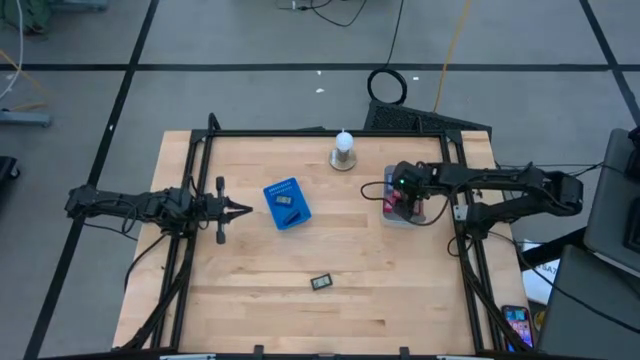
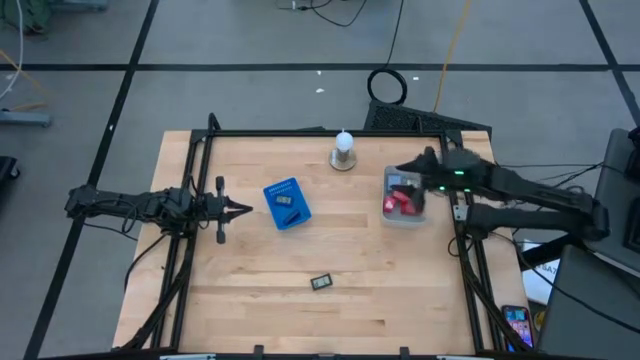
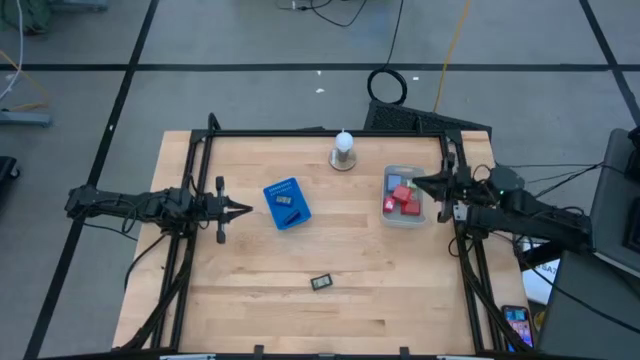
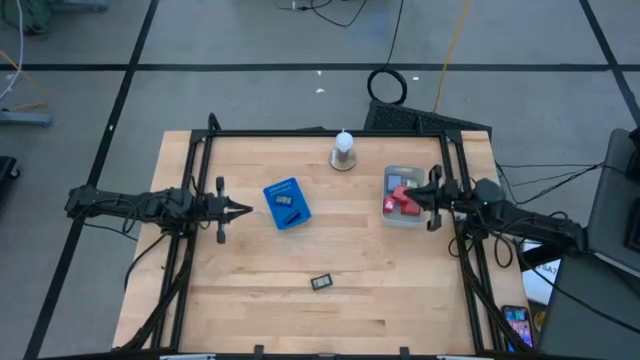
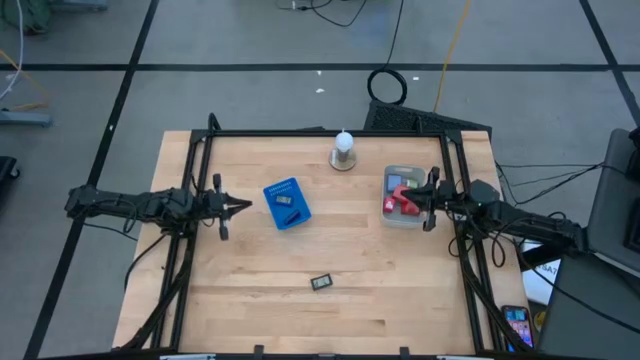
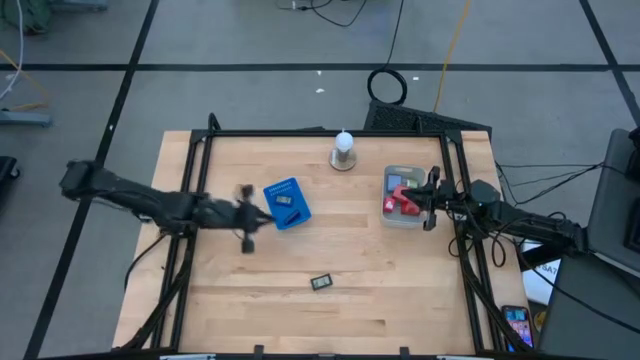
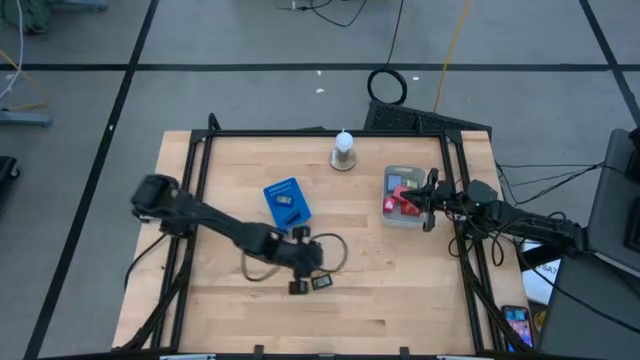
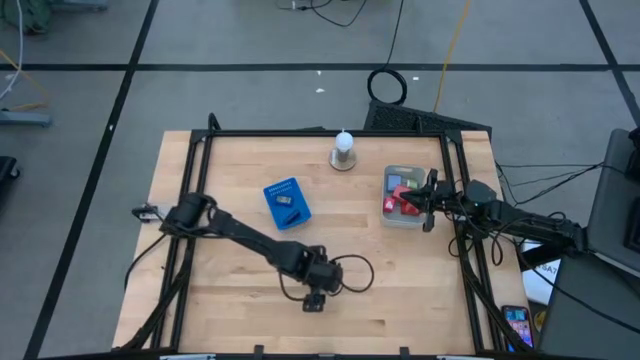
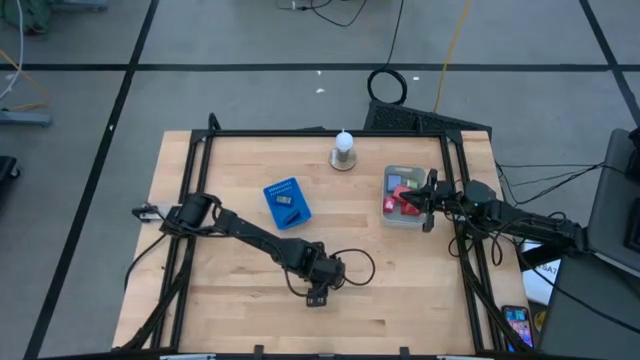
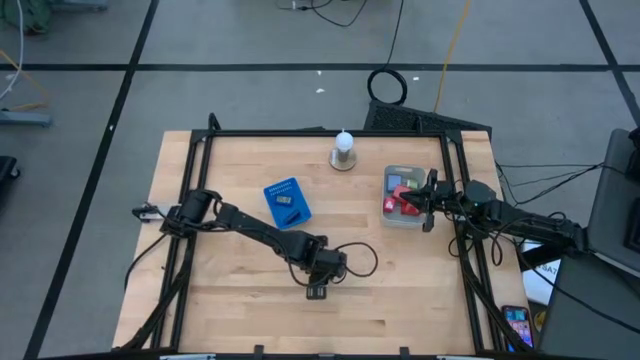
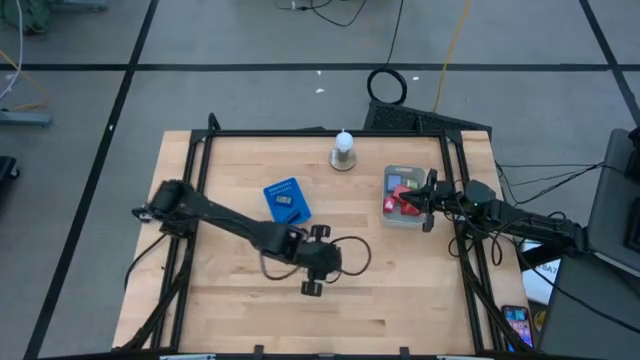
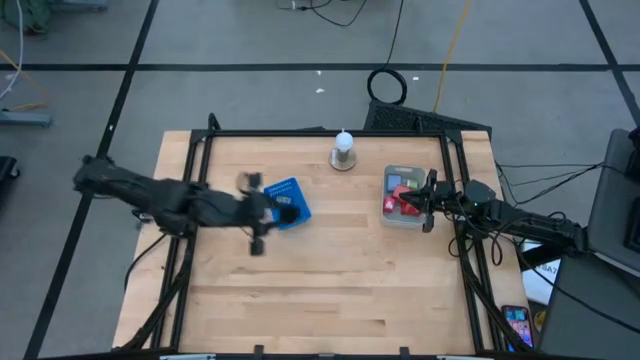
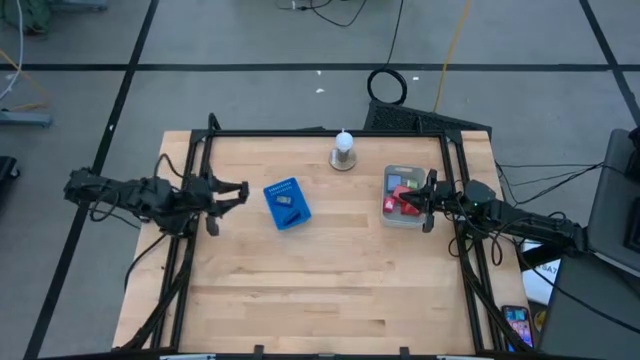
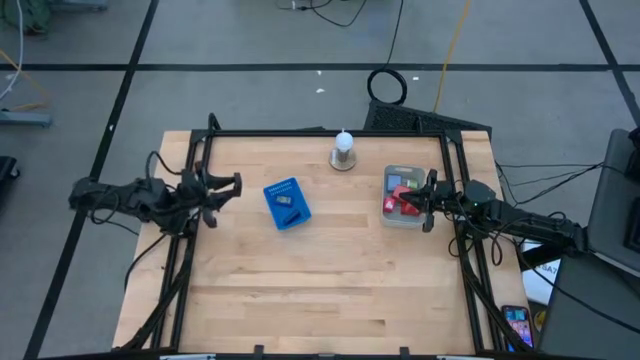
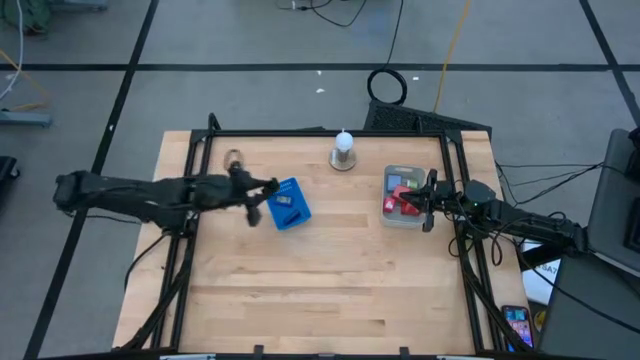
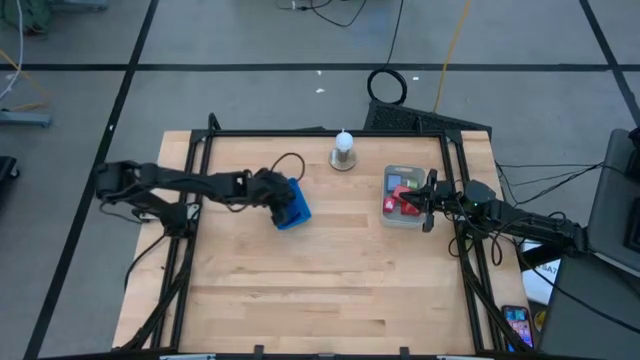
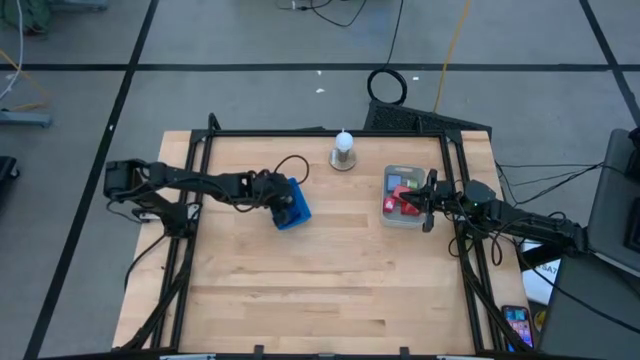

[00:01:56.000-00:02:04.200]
Task: Pick & Place Office items
Put the black digital clock into the blue bin

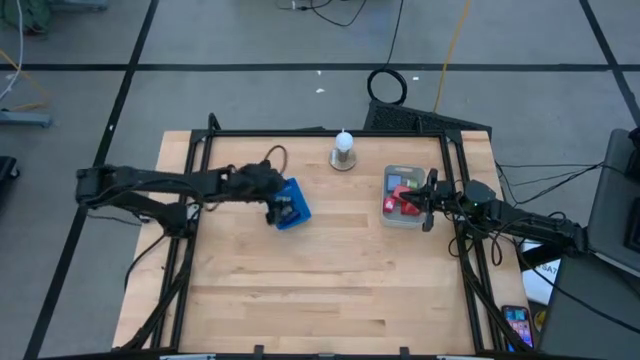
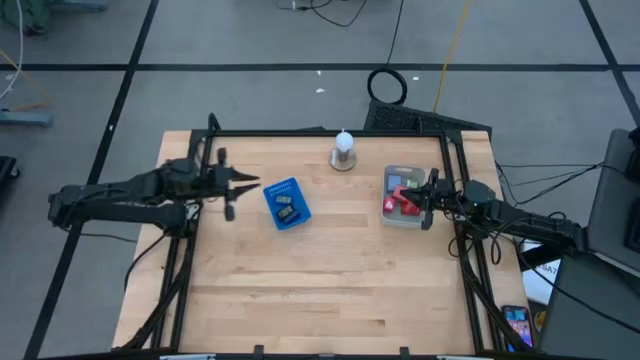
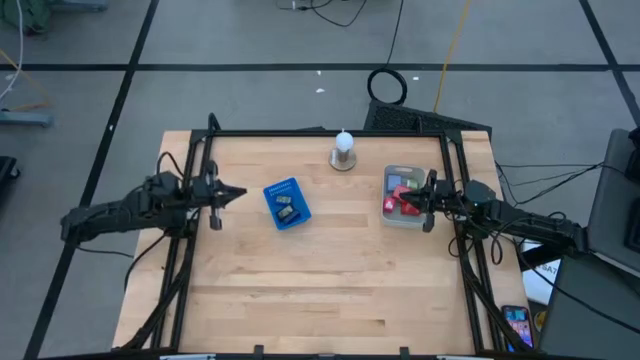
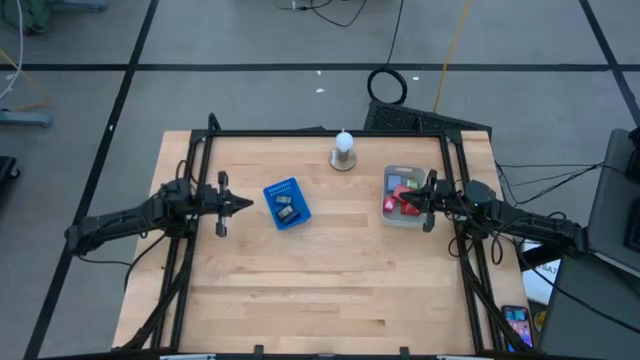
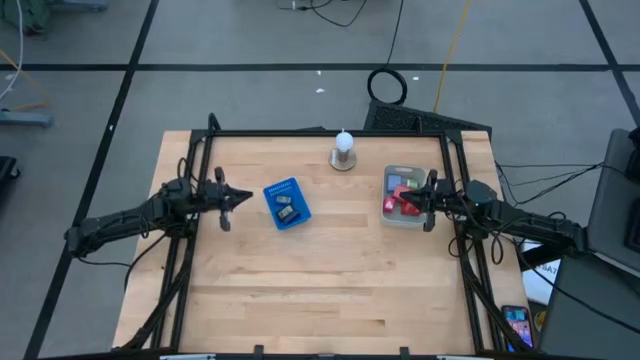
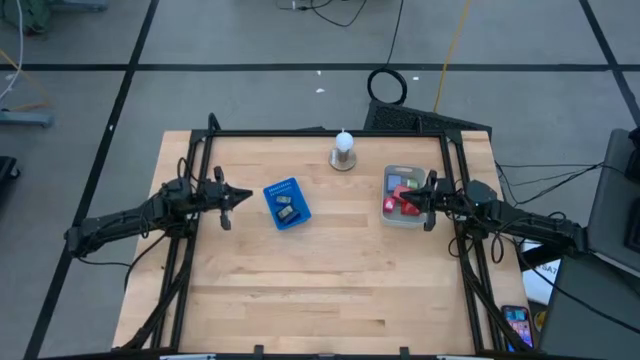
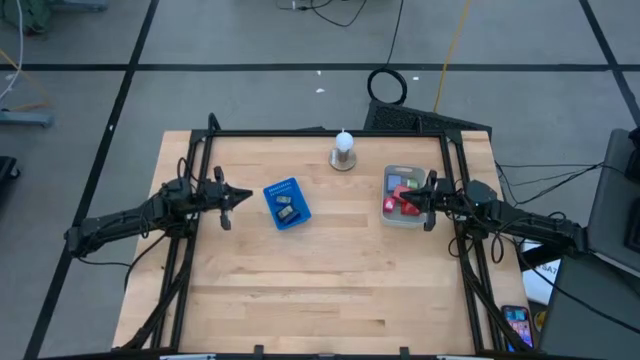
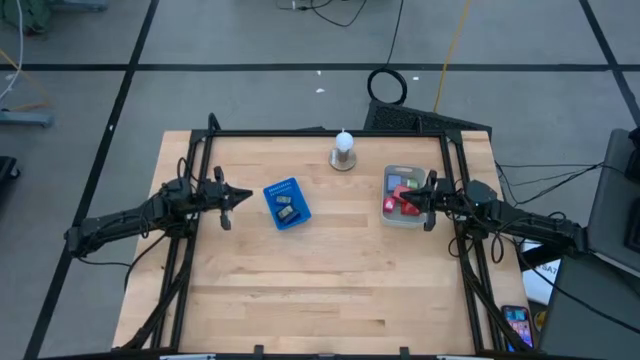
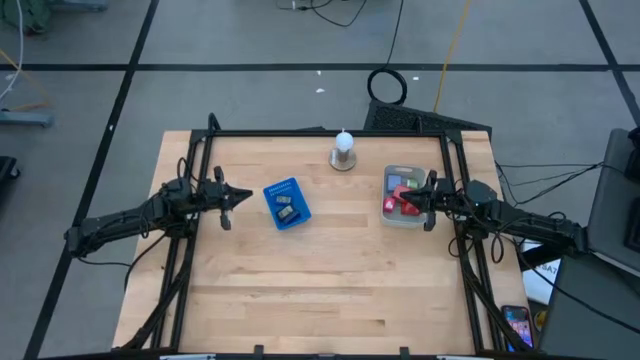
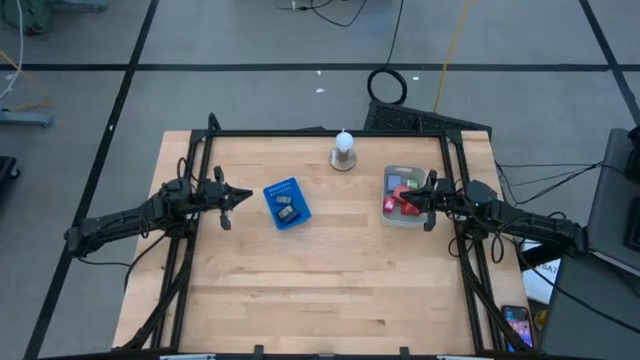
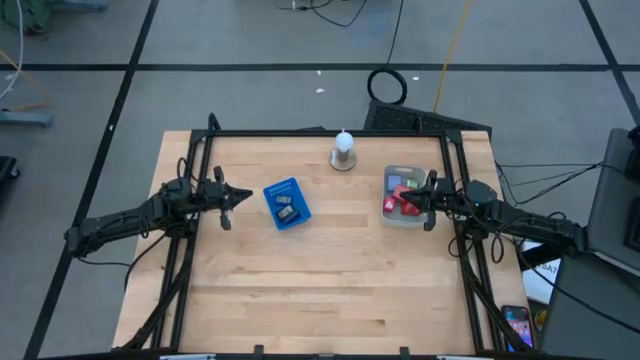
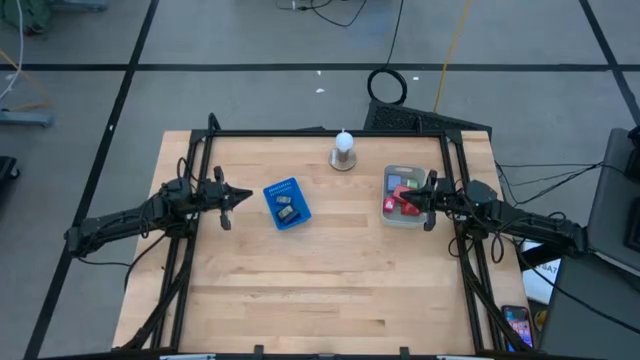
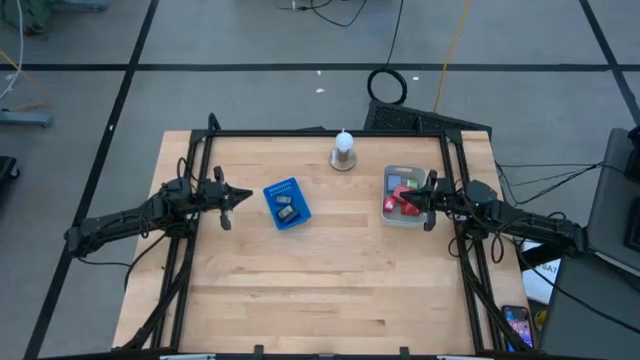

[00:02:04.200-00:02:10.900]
Return to Home Position

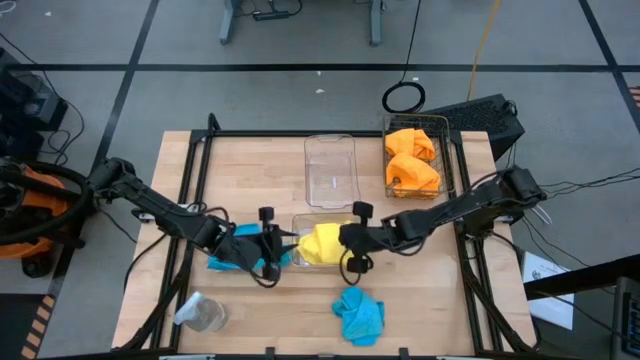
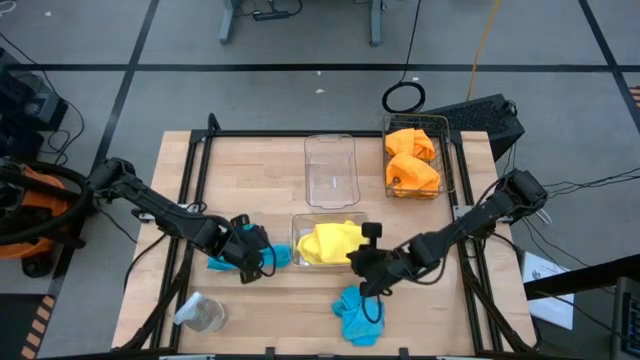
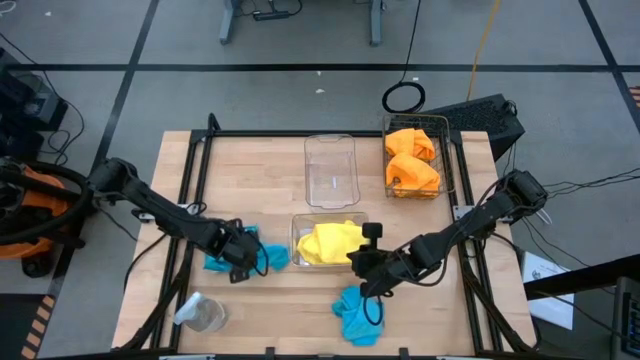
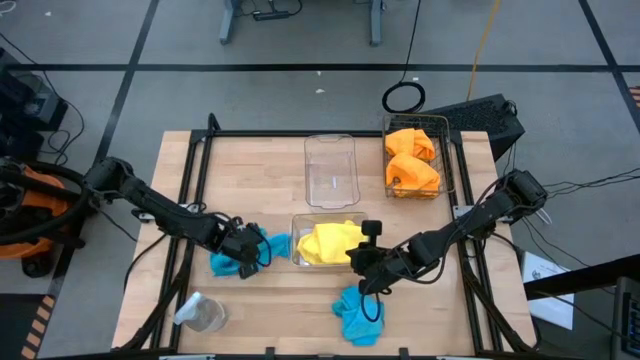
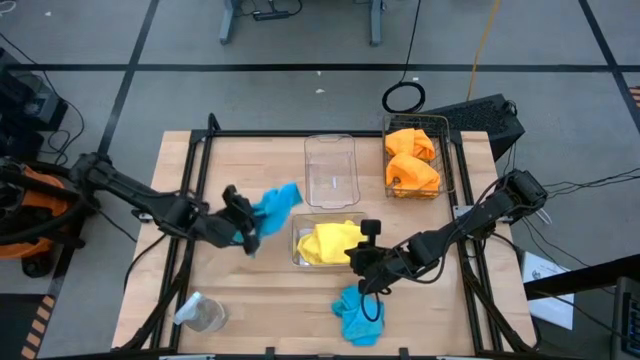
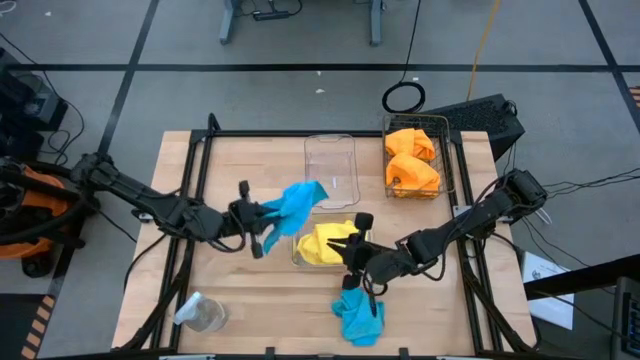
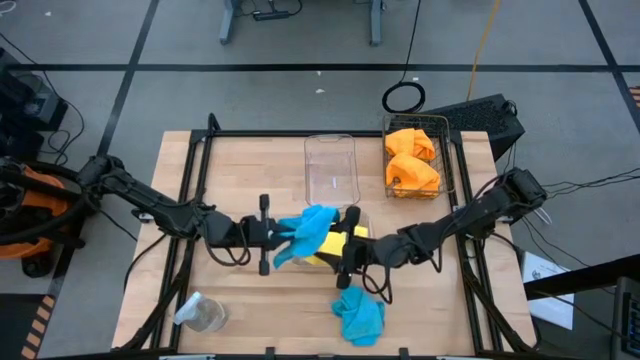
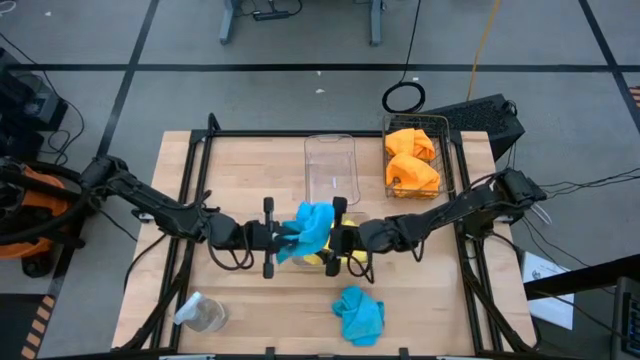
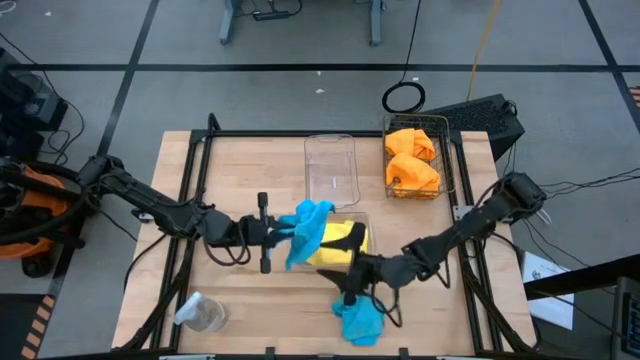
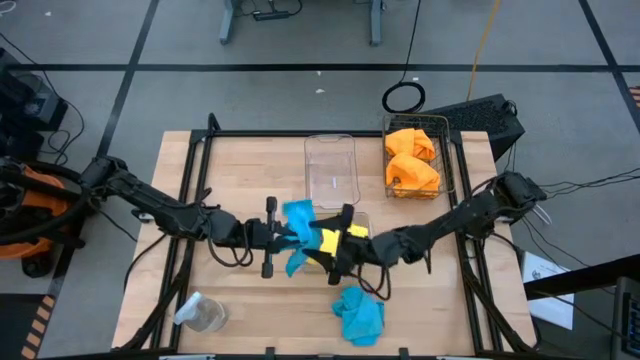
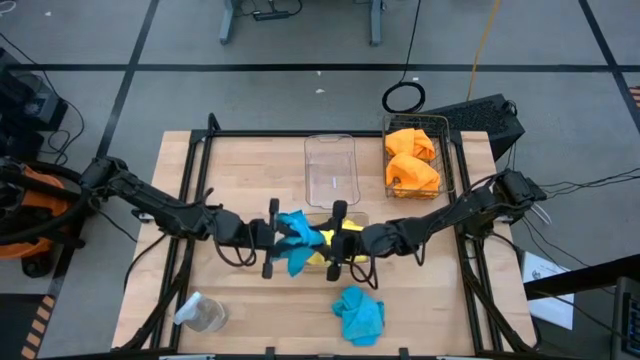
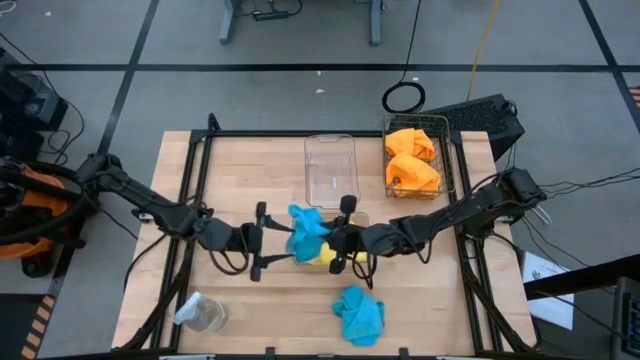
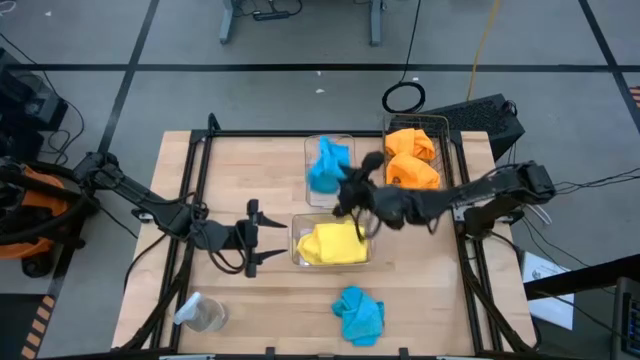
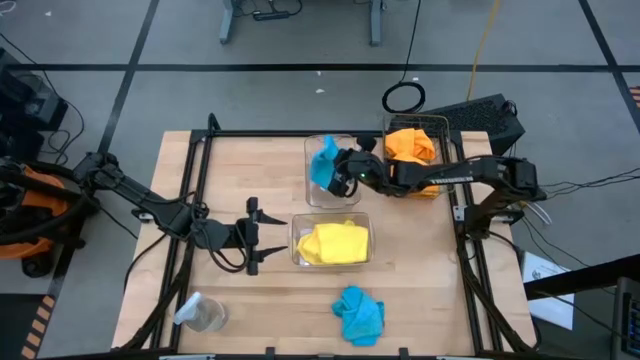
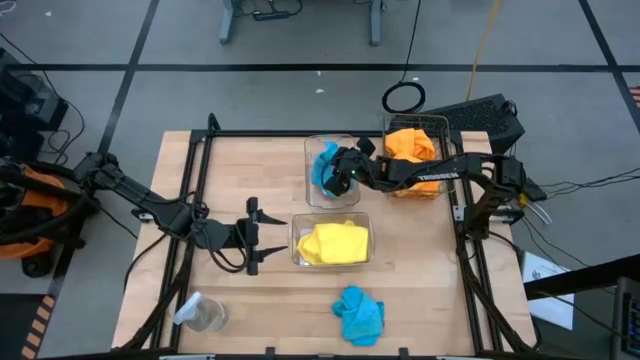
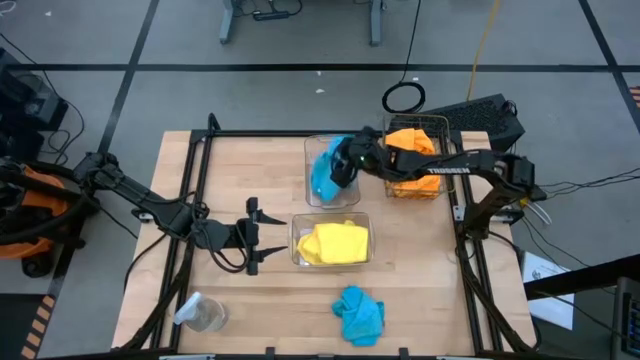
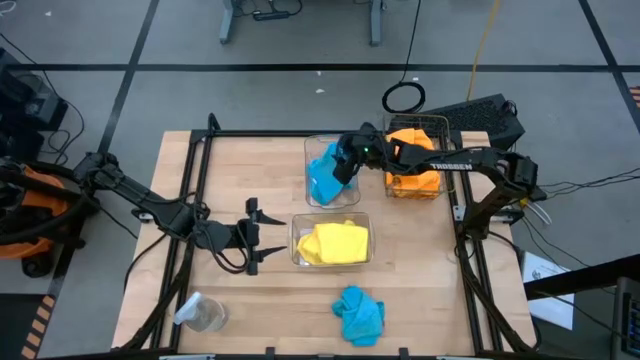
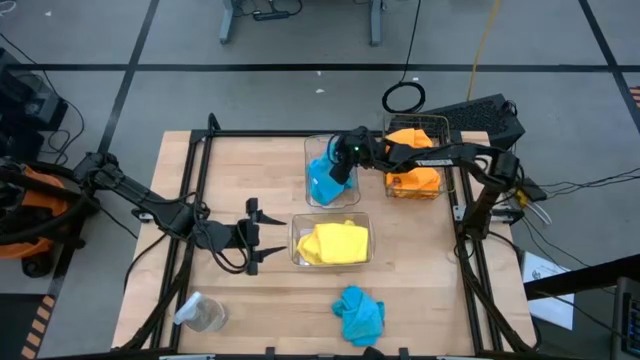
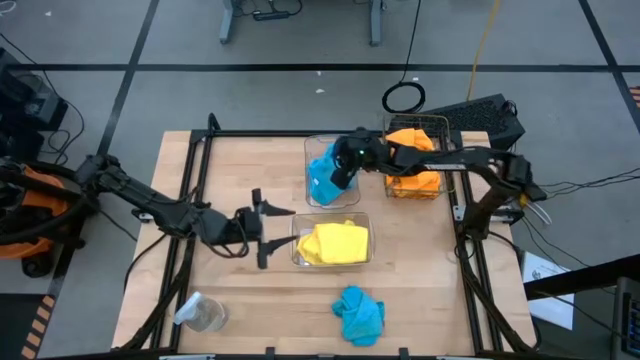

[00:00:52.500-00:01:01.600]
Task: Sort microfiber towel by color & place in baskets
Put the top blue microfiber towel into the top transparent bin
